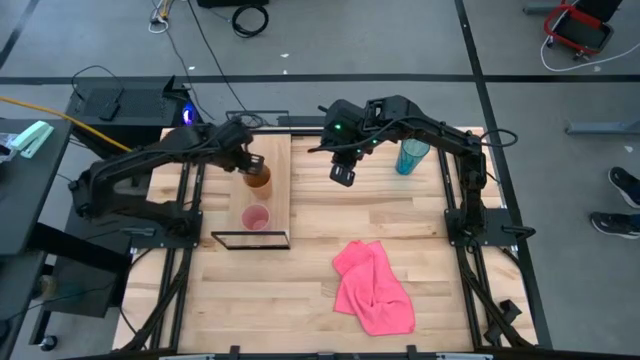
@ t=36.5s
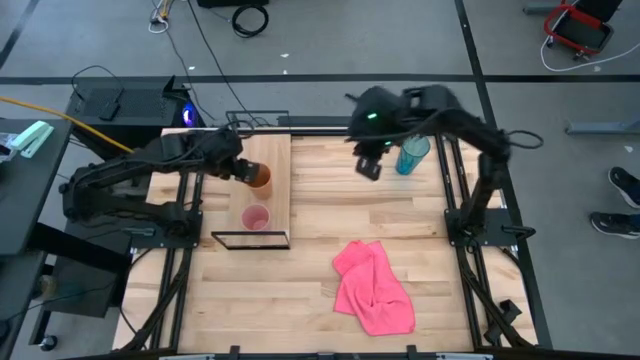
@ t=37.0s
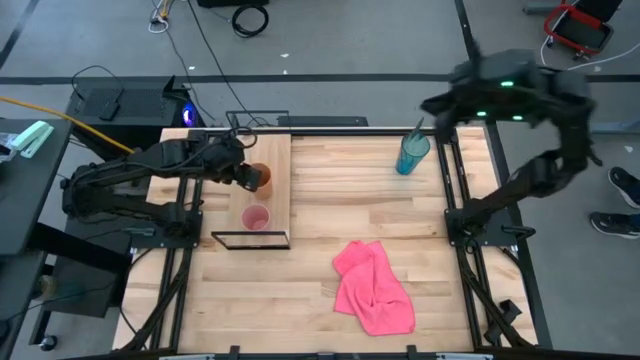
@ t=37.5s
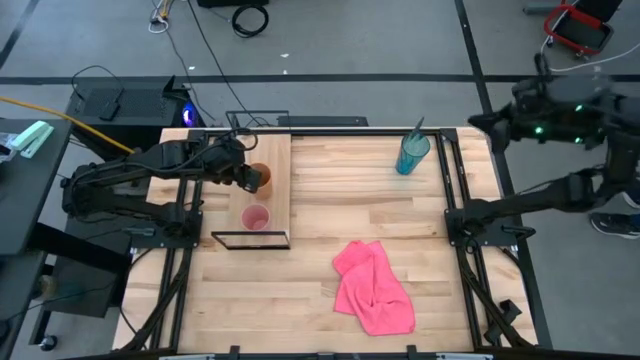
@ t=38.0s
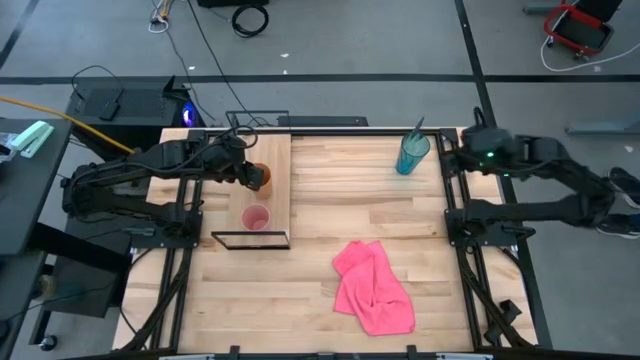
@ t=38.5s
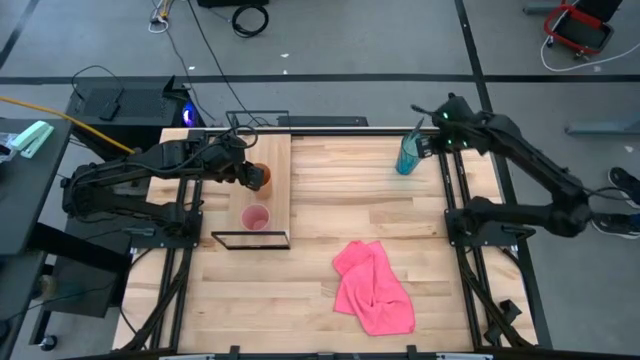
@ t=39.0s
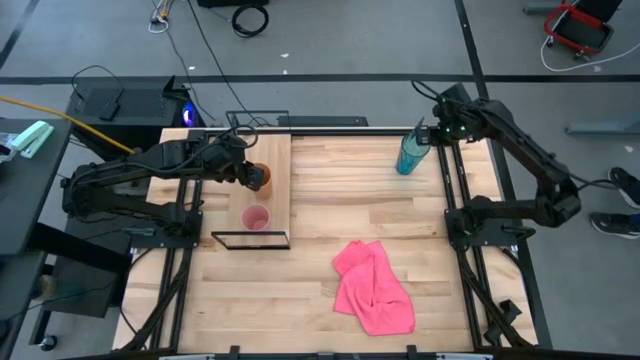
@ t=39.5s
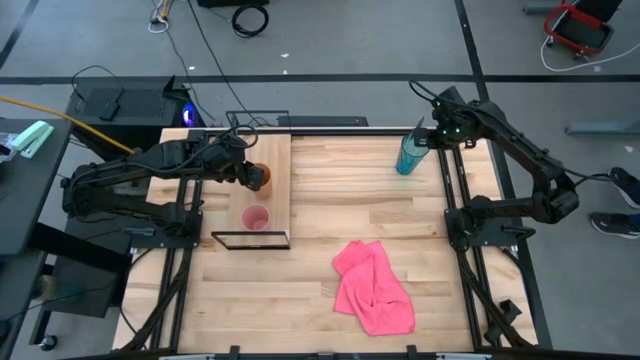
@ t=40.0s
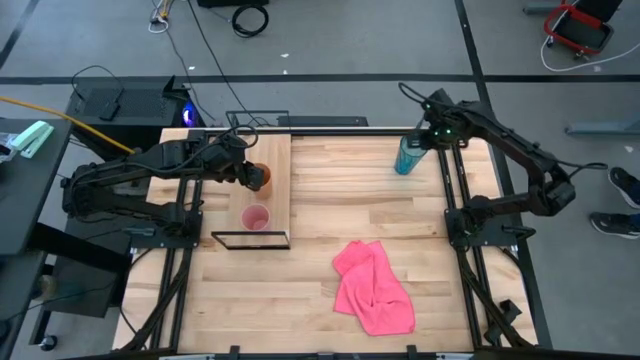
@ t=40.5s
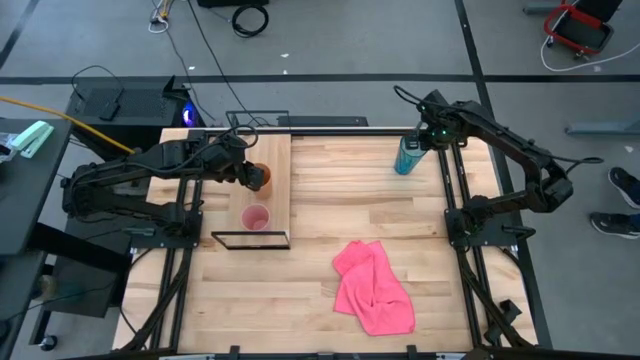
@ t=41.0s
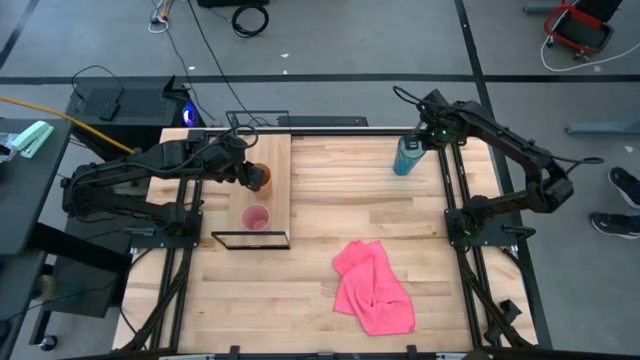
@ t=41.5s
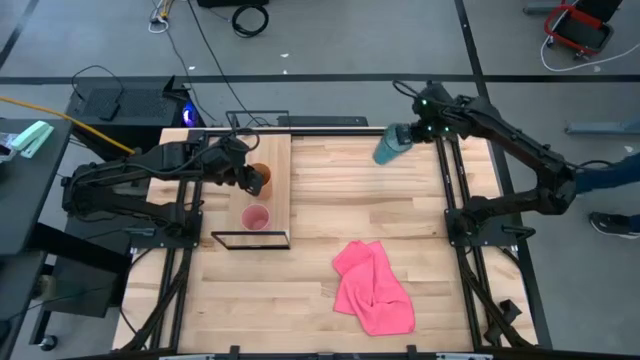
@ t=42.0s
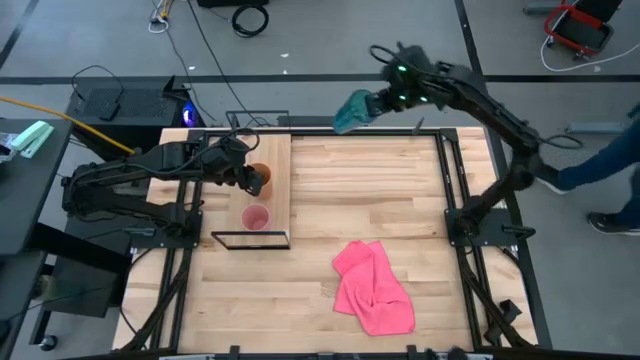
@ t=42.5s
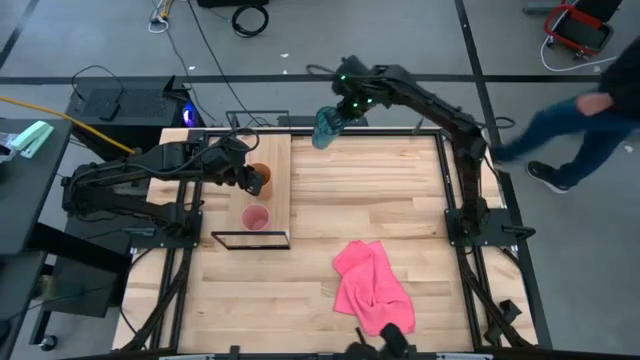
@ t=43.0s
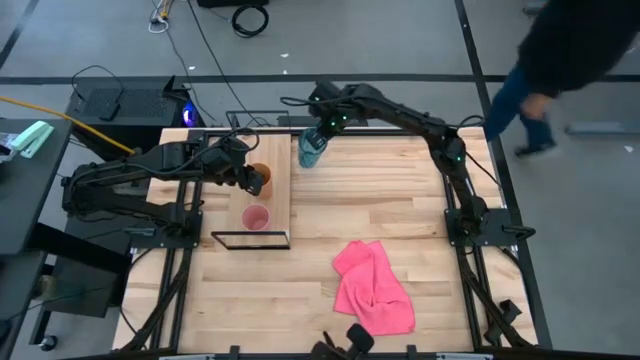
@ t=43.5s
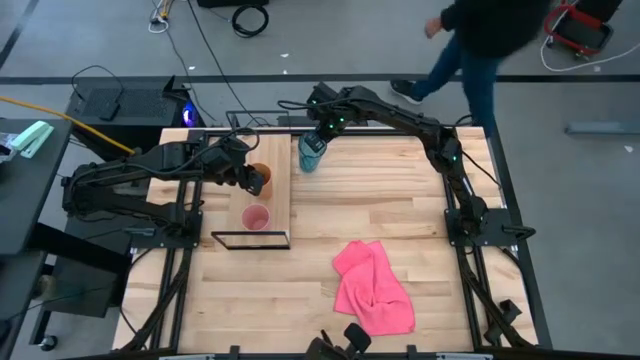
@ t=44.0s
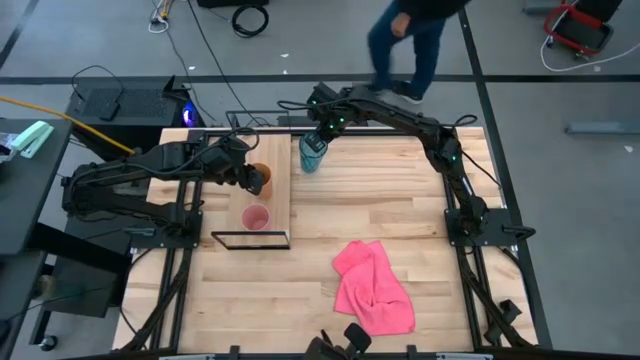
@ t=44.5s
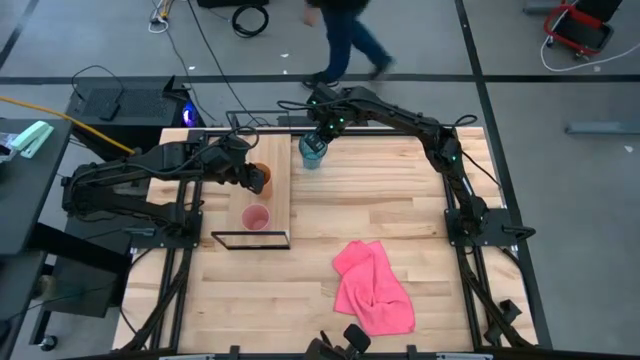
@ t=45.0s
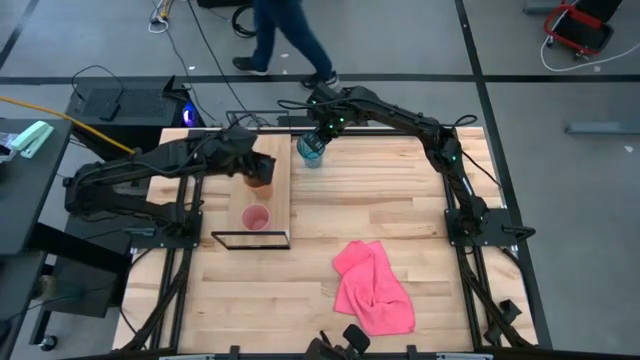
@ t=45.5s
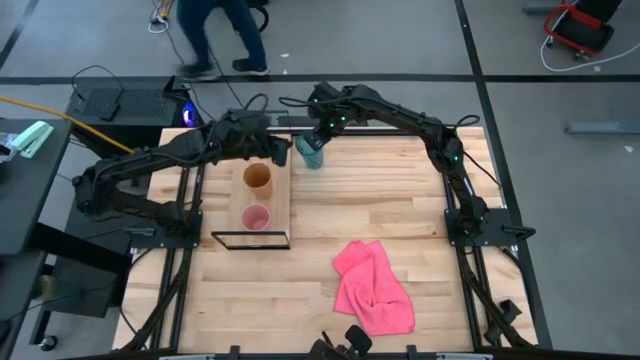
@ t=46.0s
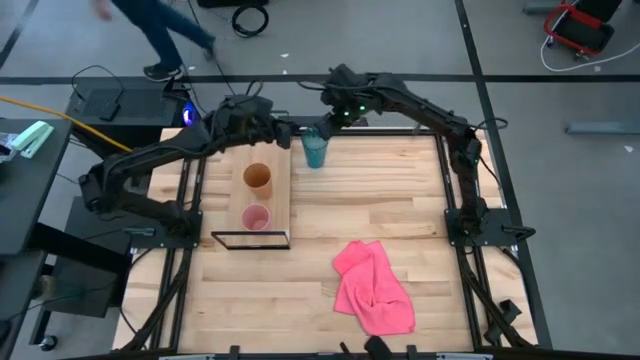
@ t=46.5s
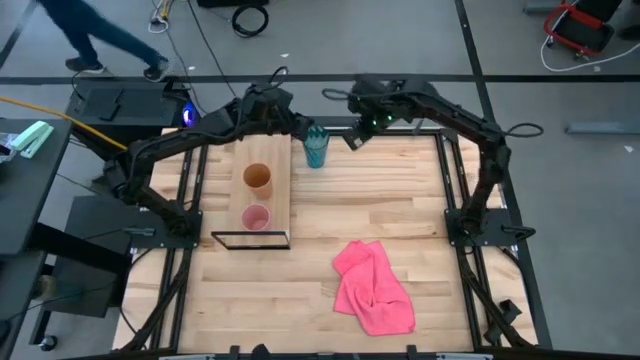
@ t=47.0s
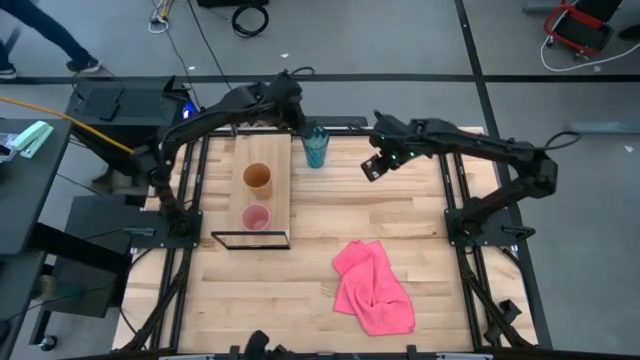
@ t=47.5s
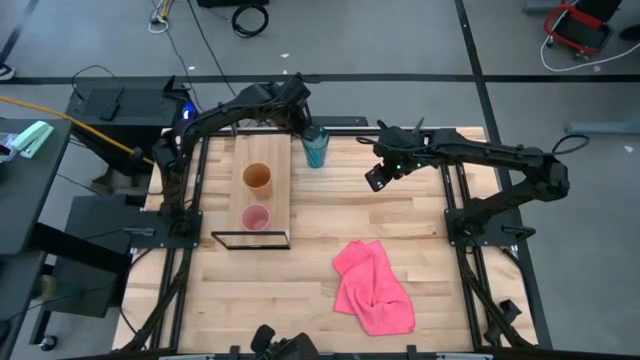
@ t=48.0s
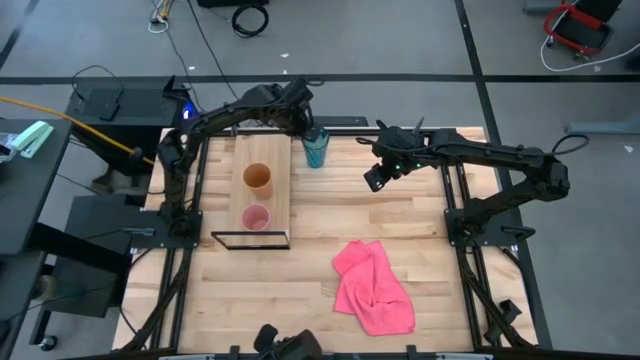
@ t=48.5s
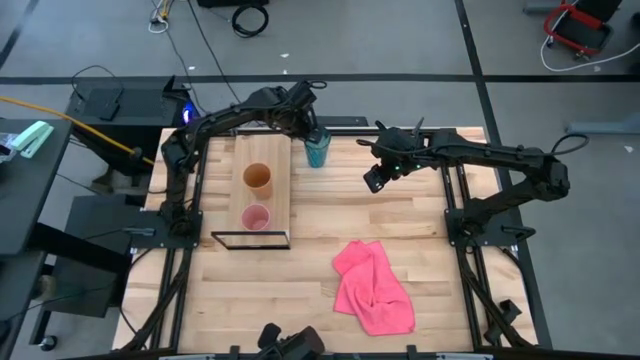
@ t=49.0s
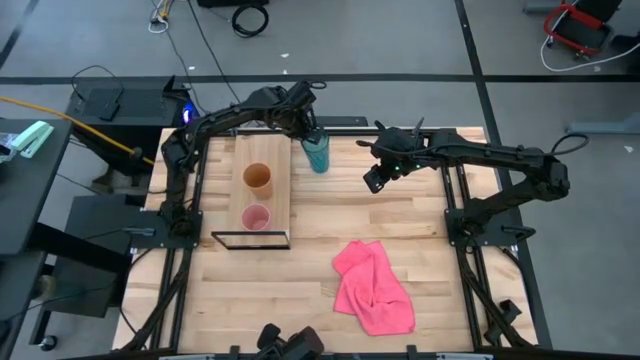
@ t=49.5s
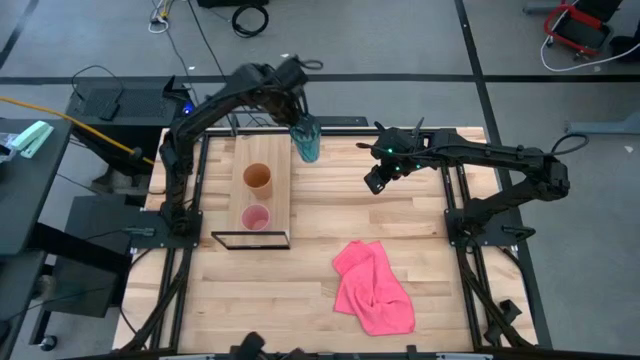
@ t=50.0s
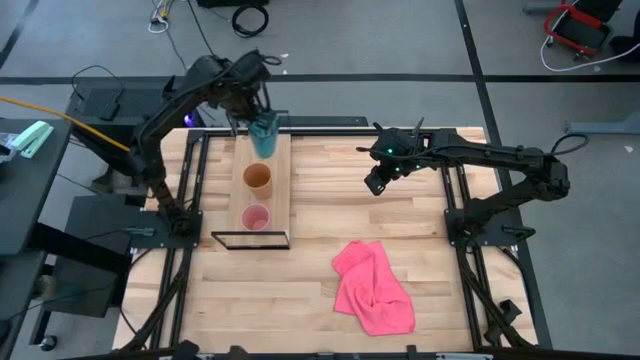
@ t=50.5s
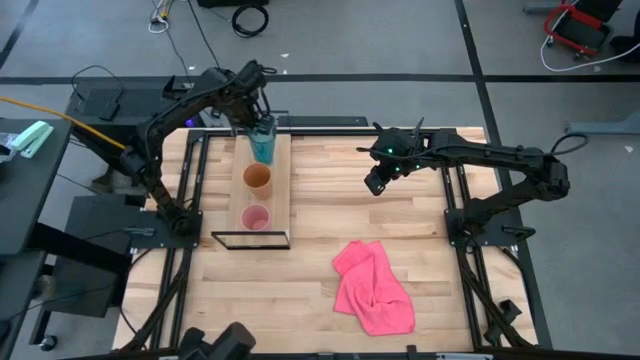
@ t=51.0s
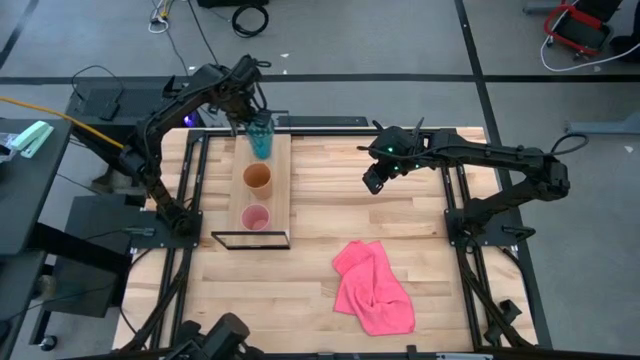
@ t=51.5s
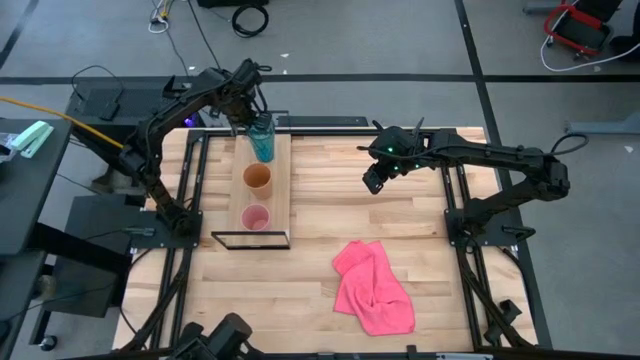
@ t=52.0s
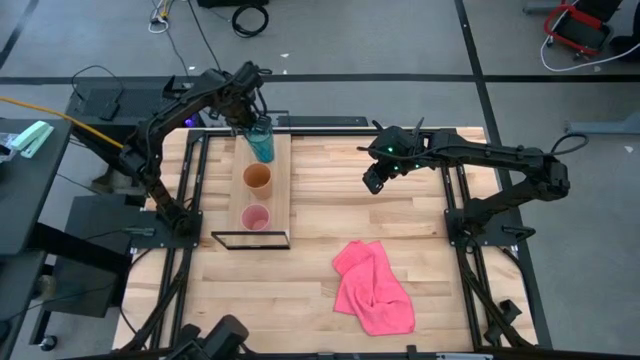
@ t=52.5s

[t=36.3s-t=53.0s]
Task: Stack small to large cups/mugs on shelf
Put the blue cup on the shelf

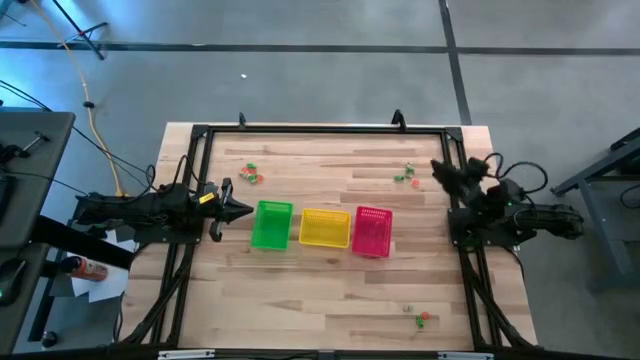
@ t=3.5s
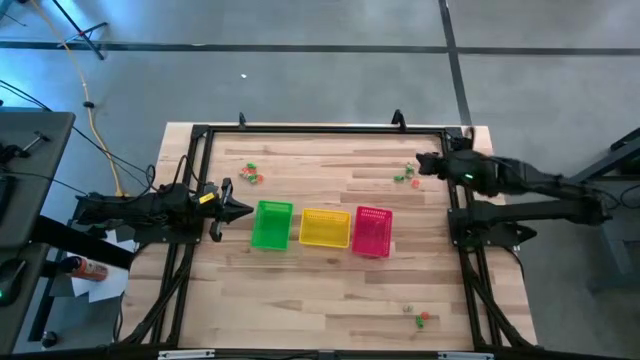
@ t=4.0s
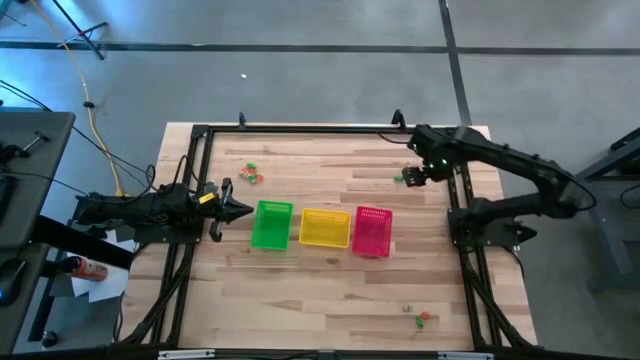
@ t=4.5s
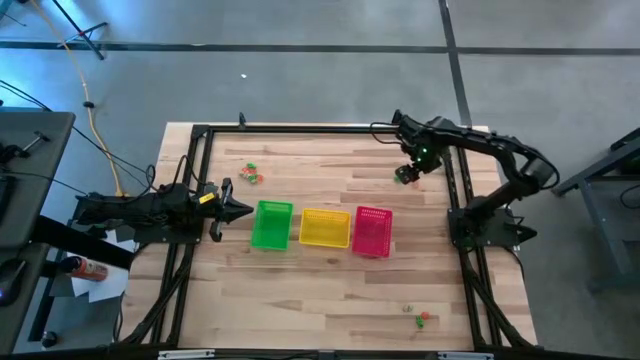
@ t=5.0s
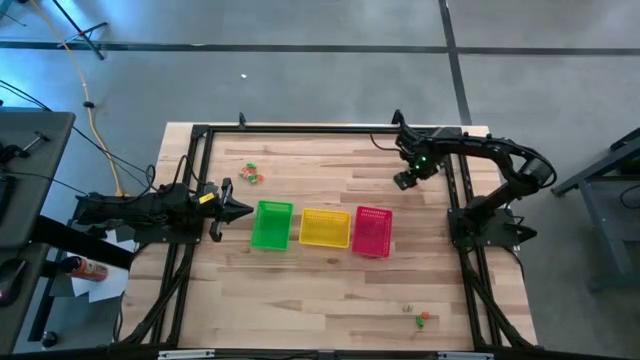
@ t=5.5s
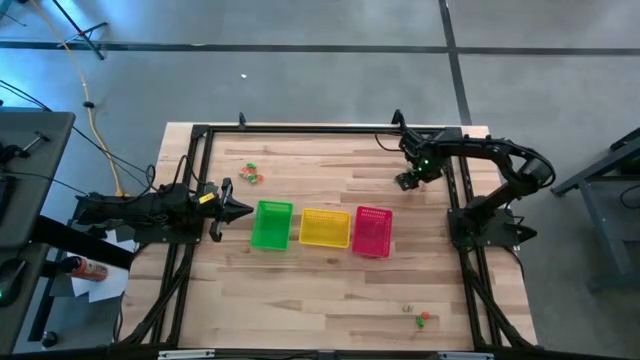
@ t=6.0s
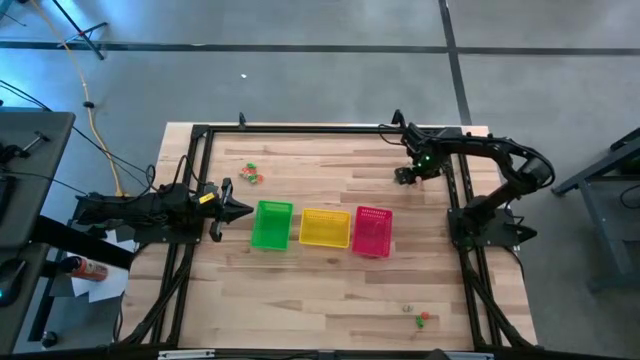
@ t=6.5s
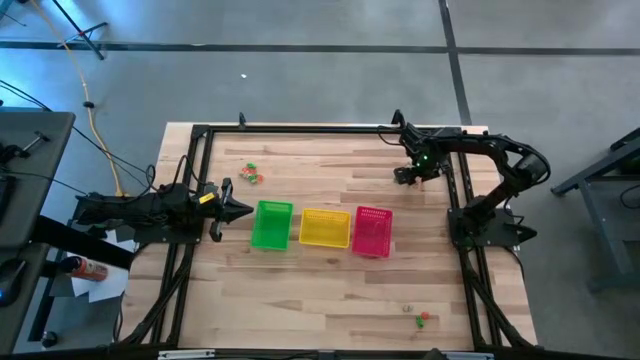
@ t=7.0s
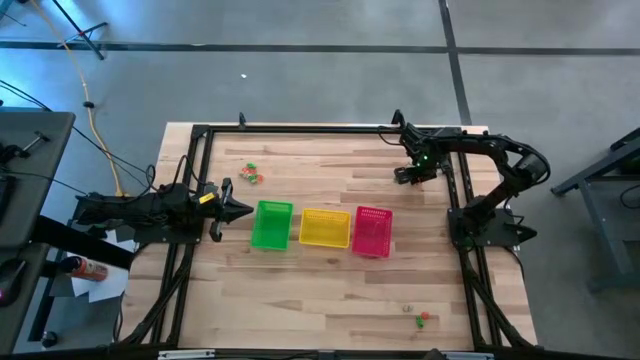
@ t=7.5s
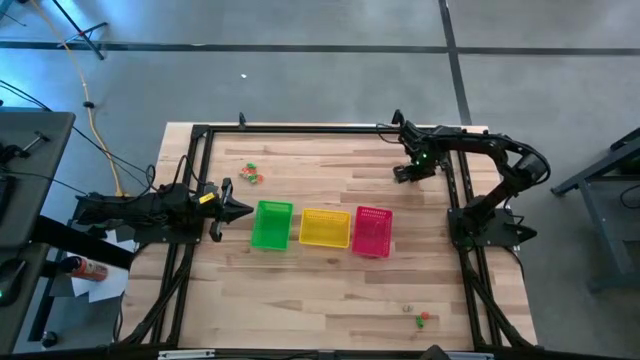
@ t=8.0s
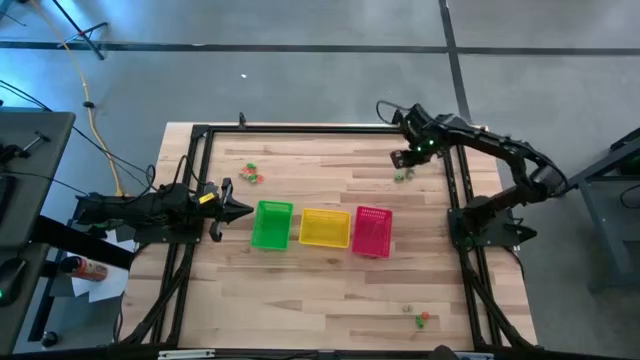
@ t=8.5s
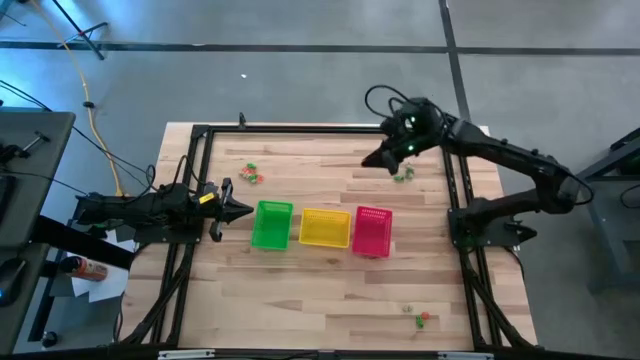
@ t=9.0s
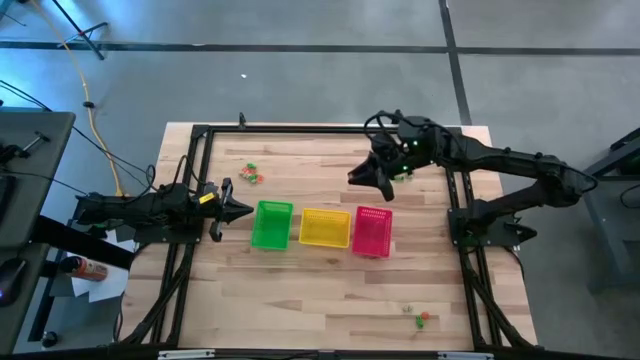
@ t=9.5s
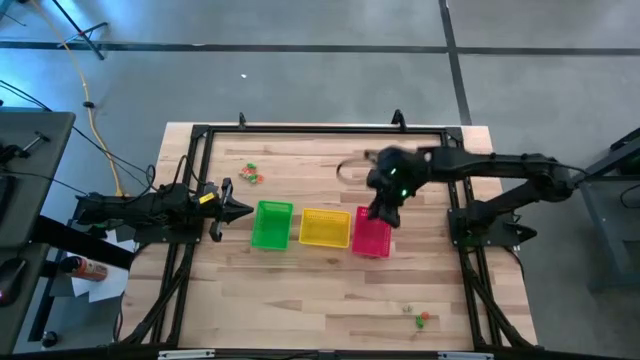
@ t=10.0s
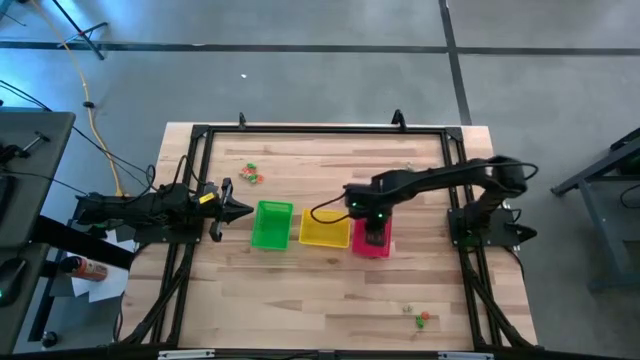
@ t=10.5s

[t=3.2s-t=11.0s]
Task: Sort Halloween decoration
Put the orange pumpkin toy into the red basket
